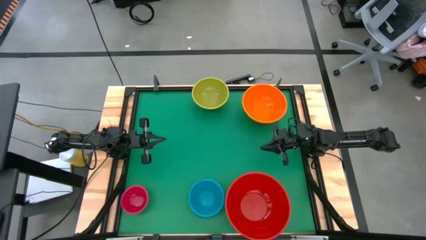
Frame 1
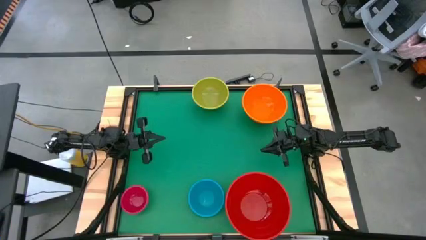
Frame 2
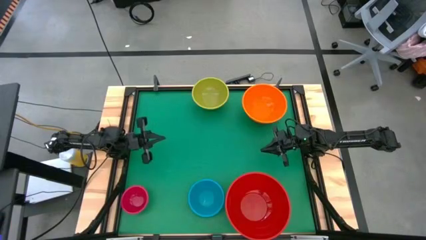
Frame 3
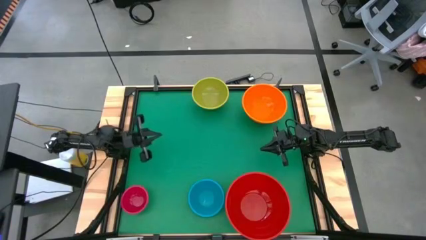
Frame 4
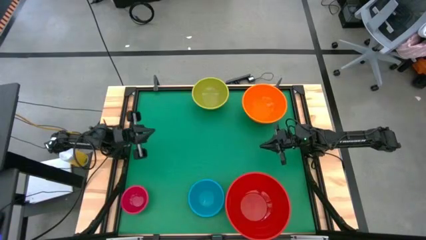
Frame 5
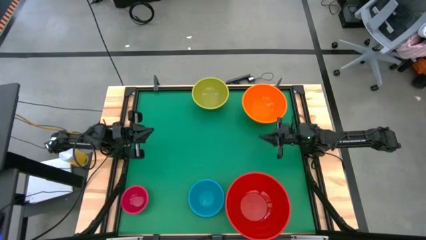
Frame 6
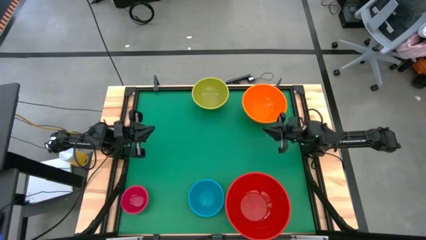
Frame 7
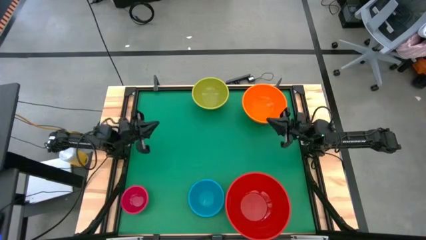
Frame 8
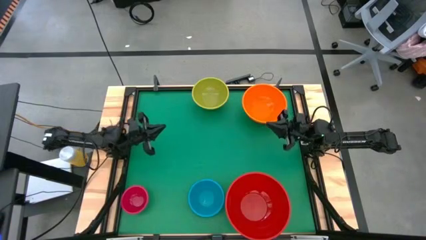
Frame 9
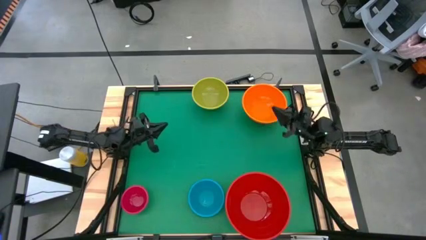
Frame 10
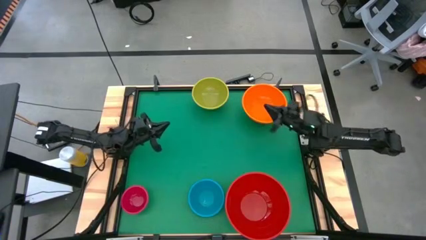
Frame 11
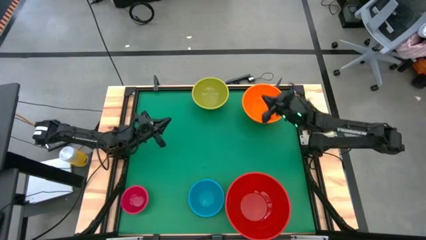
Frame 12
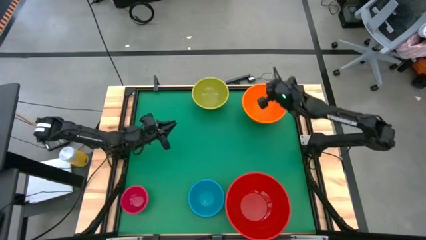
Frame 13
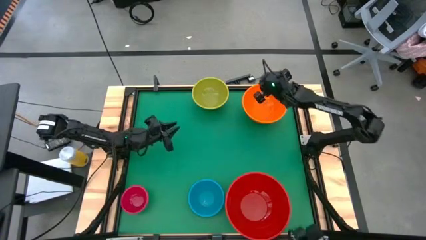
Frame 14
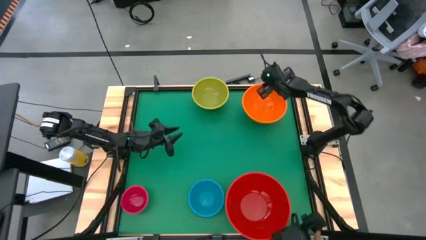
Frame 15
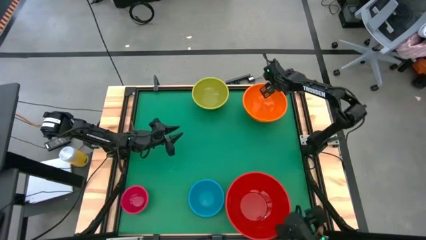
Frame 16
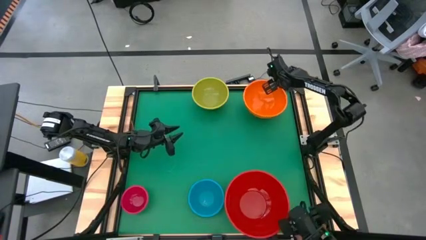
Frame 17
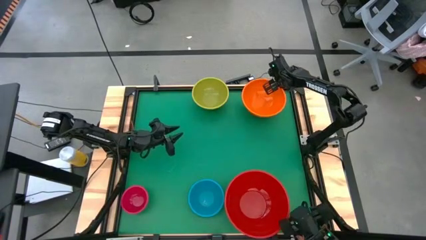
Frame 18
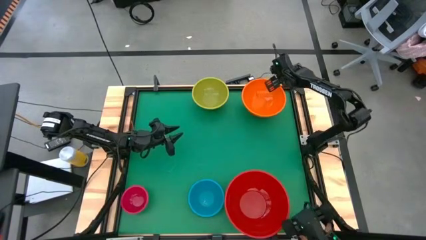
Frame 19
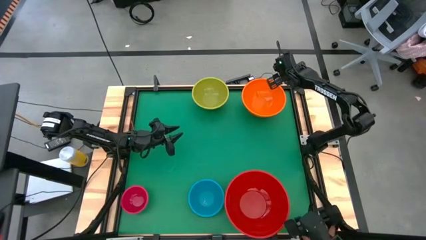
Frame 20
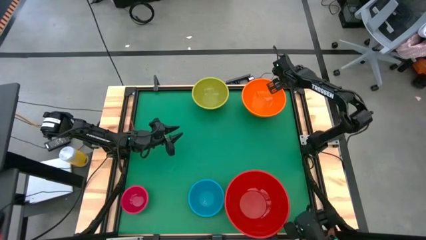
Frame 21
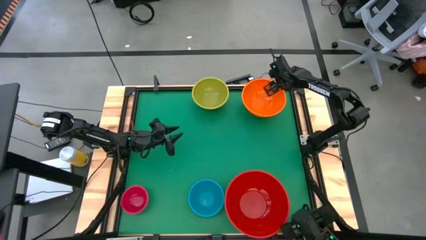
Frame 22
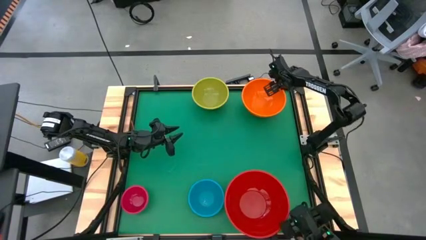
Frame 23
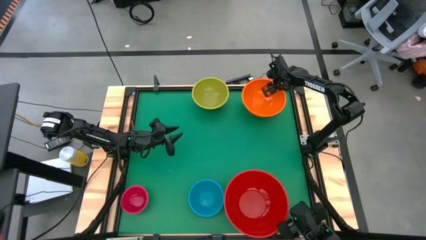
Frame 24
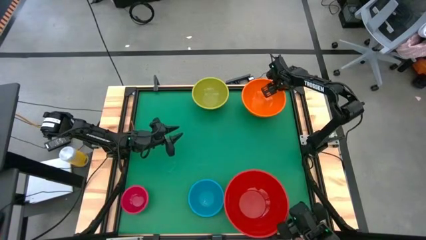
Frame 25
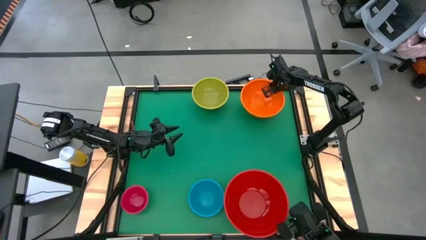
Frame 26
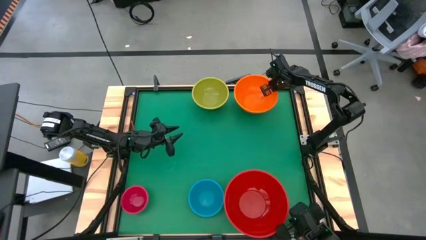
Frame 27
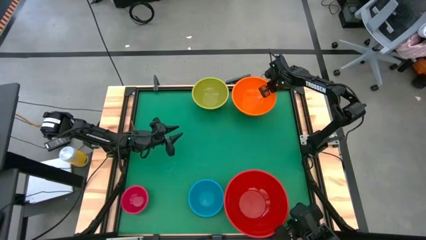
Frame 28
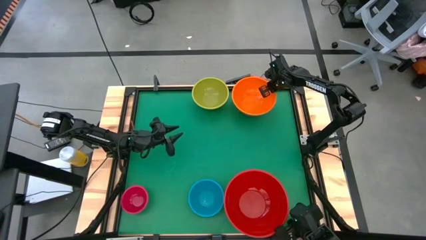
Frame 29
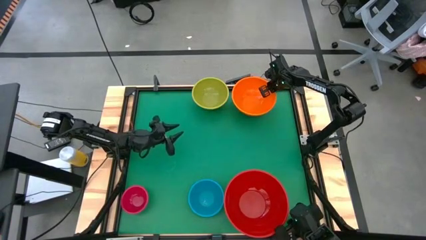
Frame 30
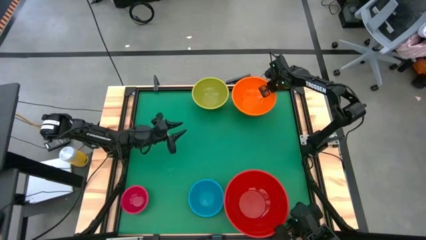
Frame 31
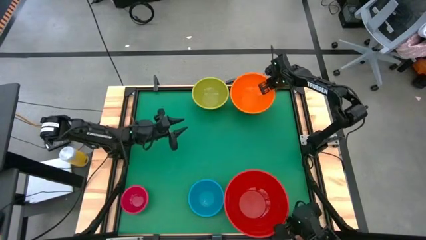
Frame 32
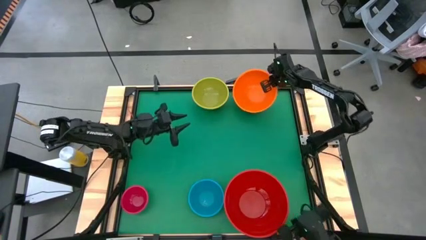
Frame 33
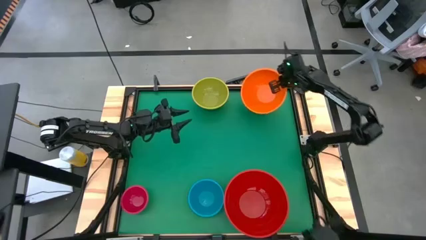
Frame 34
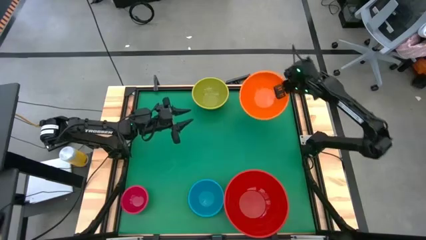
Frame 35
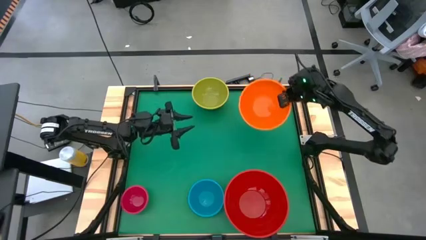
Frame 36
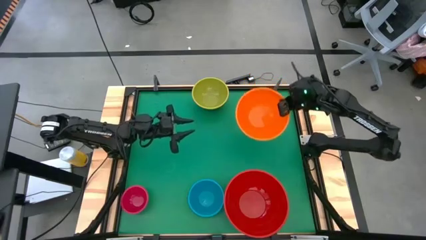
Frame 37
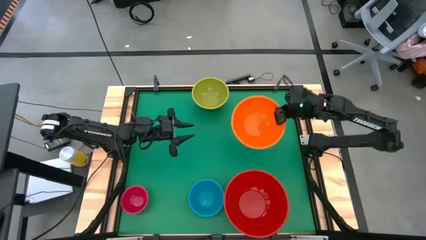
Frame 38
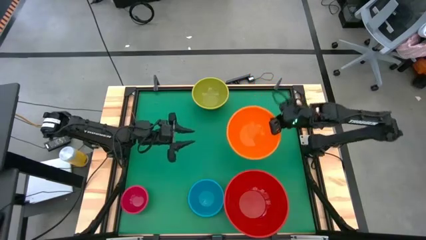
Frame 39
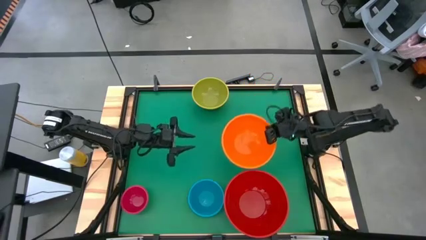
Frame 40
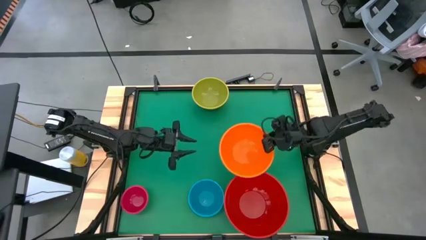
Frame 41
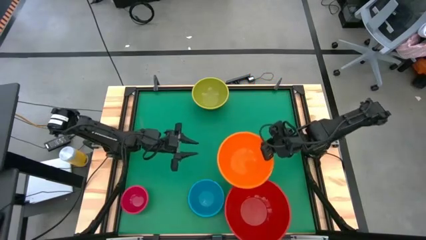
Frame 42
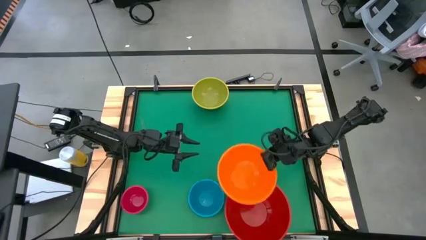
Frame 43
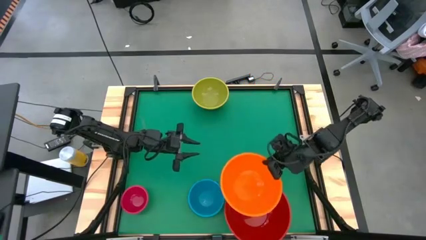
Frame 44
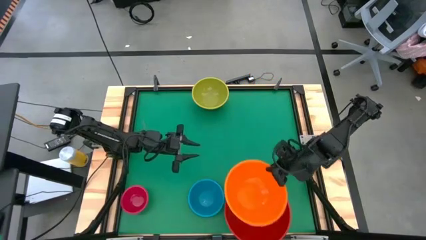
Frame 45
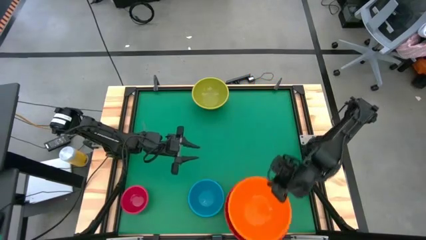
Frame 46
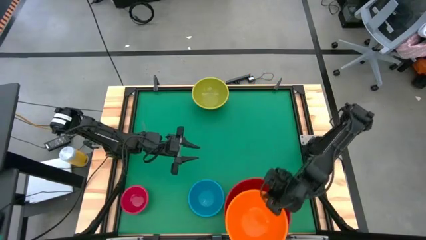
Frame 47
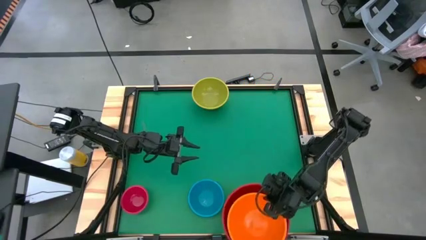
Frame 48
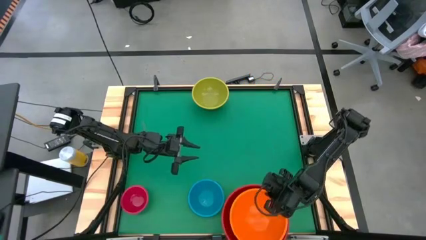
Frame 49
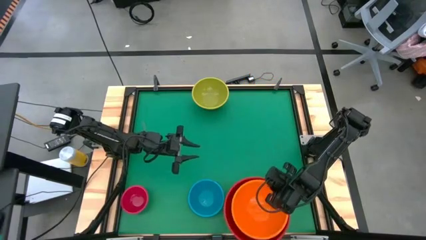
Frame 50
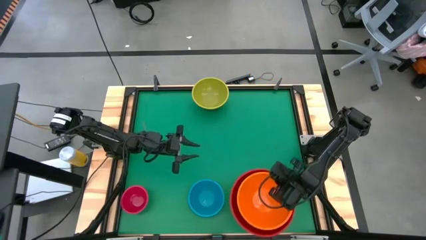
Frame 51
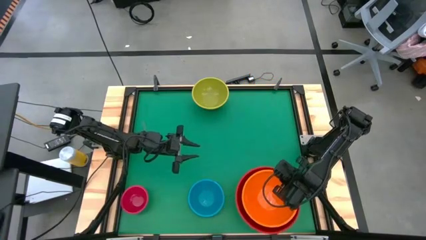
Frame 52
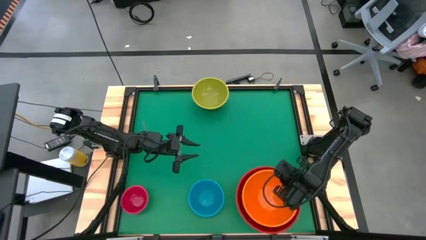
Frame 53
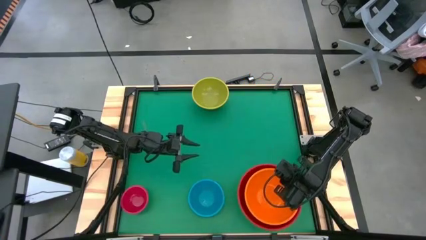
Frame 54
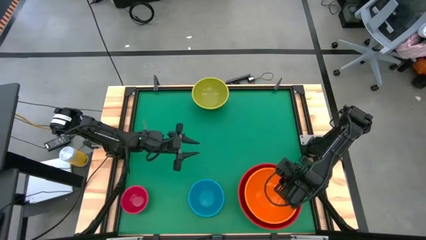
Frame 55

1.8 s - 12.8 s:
Stack the orange bowl on top of the red bowl
